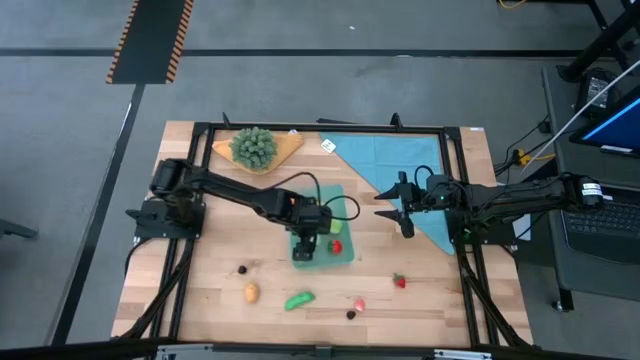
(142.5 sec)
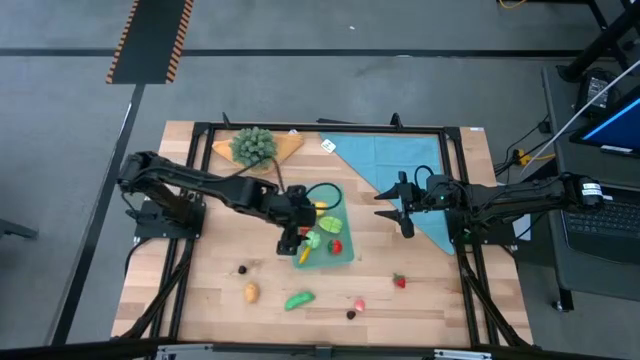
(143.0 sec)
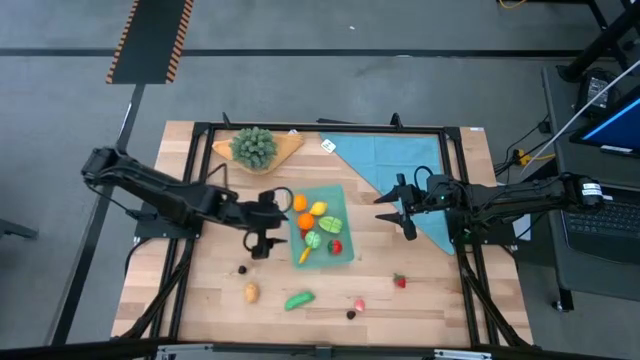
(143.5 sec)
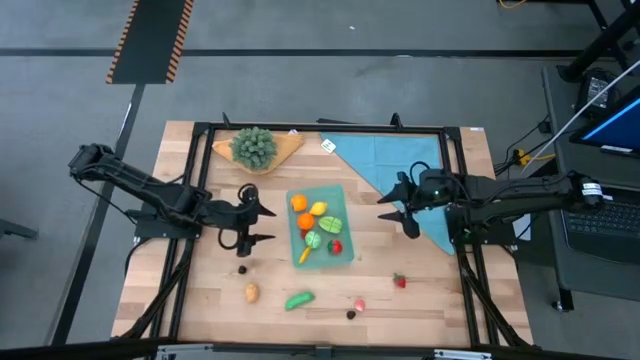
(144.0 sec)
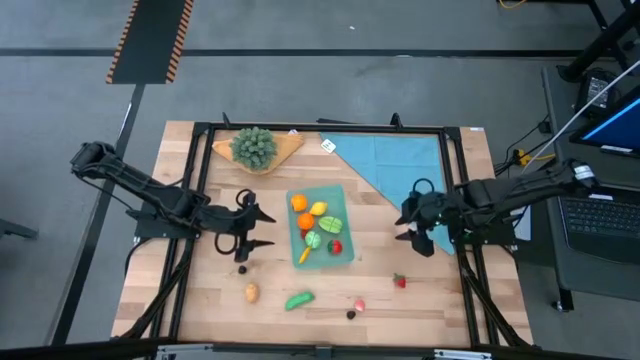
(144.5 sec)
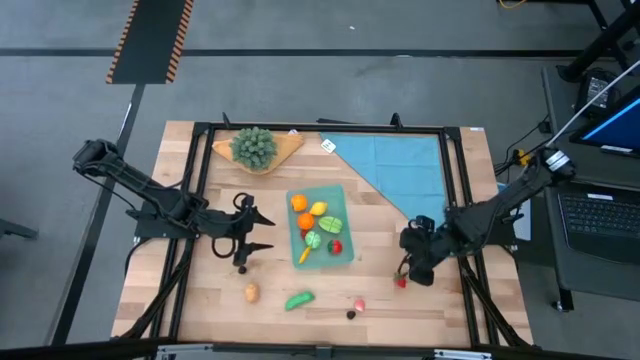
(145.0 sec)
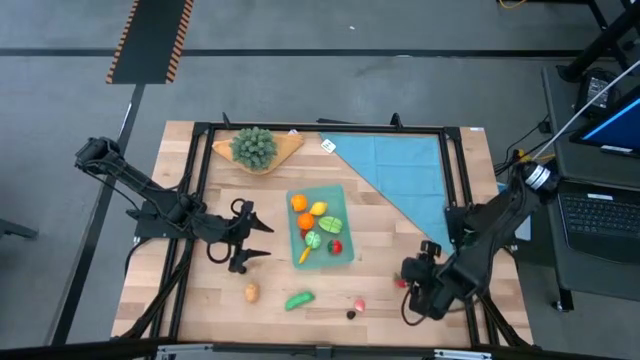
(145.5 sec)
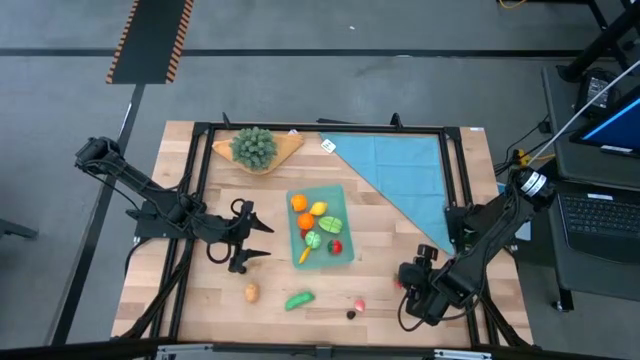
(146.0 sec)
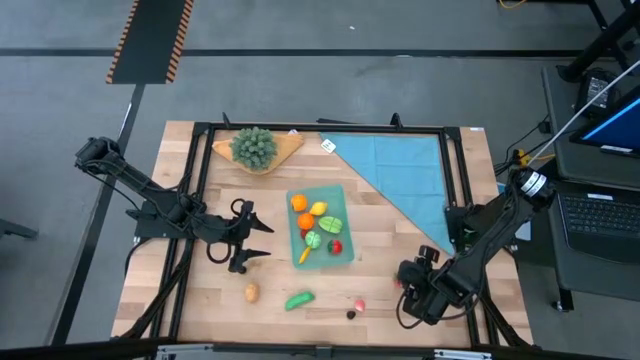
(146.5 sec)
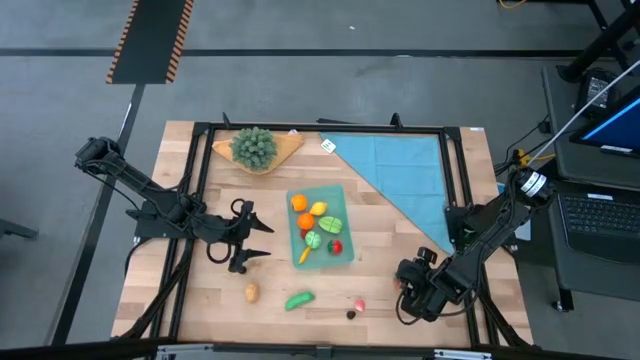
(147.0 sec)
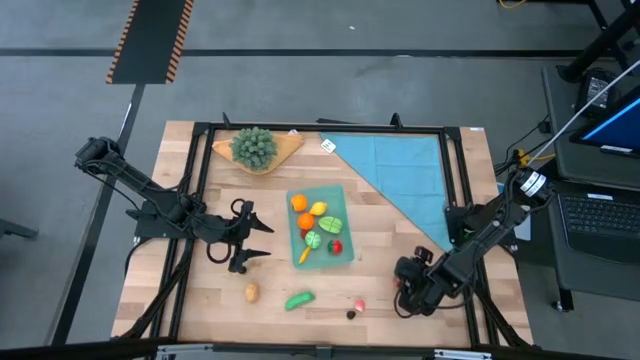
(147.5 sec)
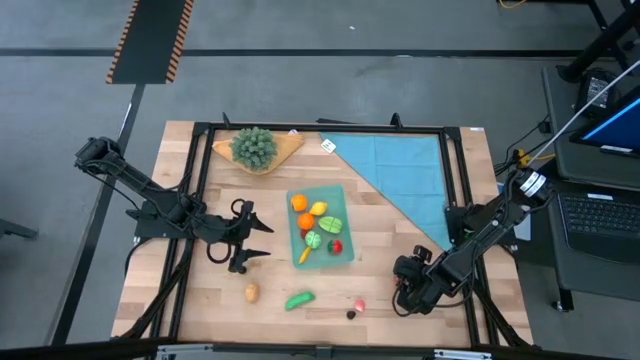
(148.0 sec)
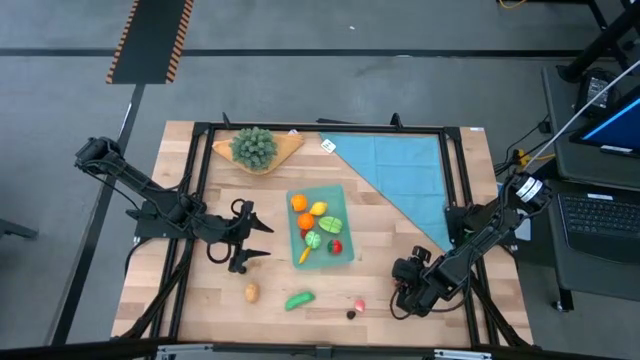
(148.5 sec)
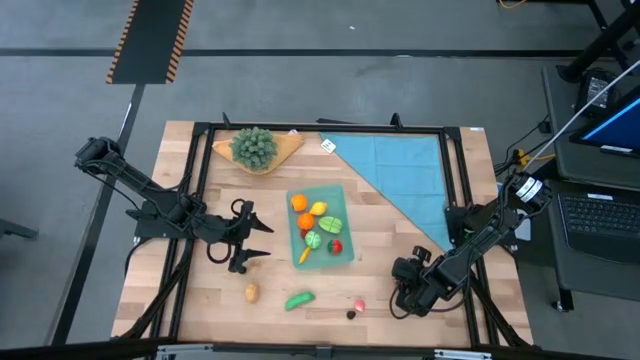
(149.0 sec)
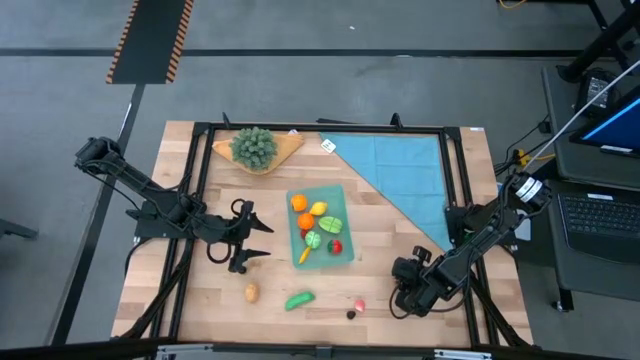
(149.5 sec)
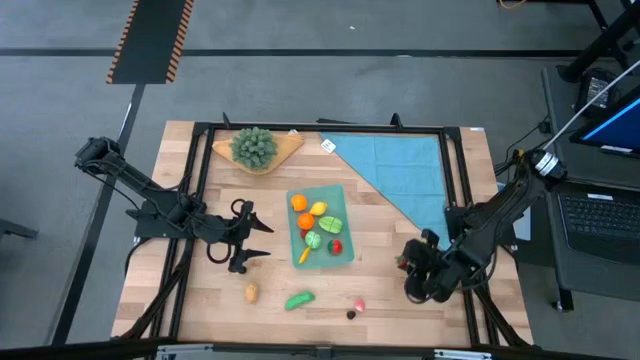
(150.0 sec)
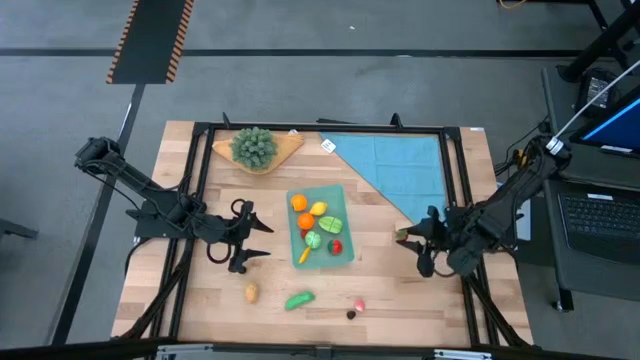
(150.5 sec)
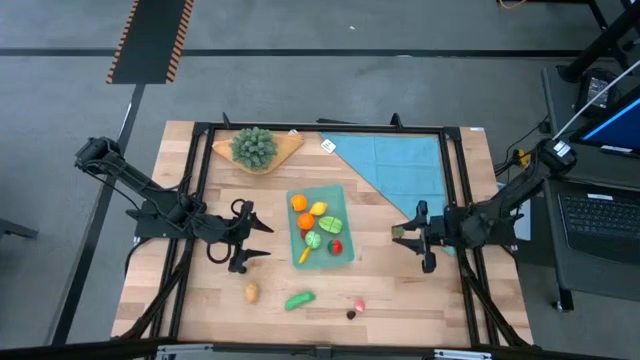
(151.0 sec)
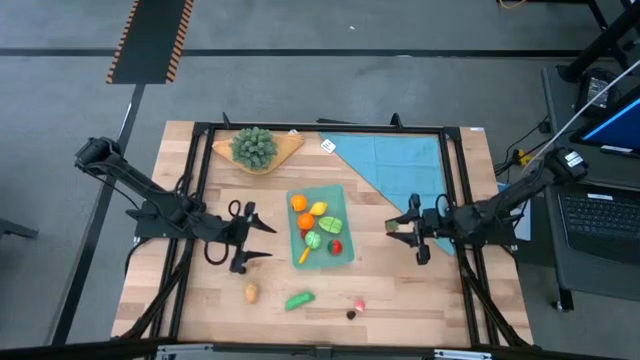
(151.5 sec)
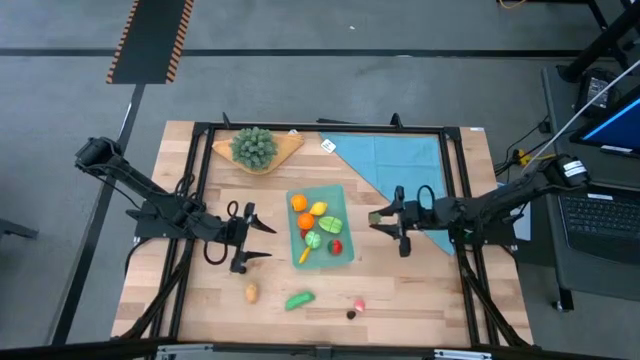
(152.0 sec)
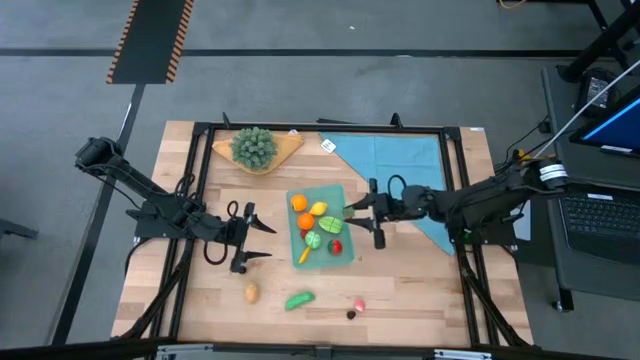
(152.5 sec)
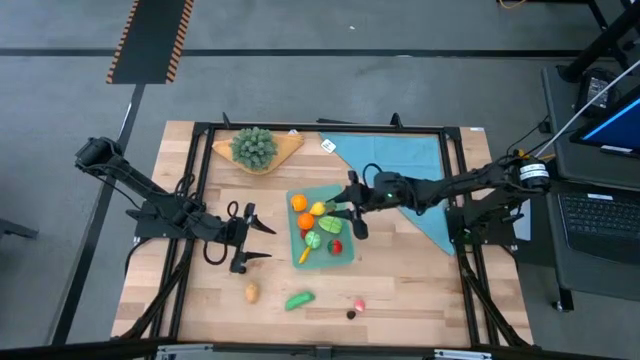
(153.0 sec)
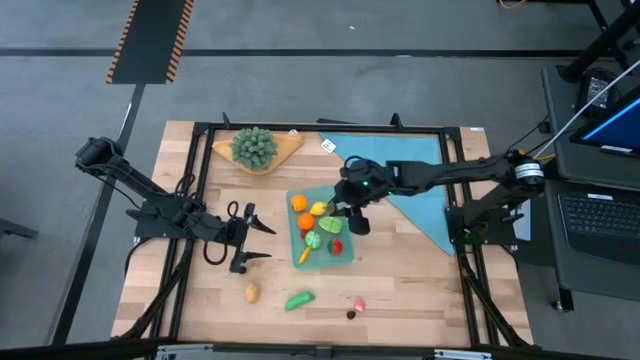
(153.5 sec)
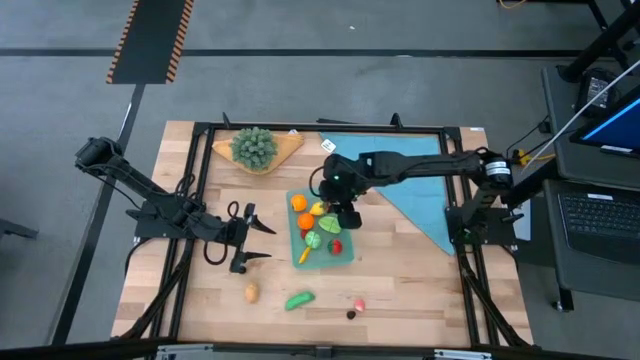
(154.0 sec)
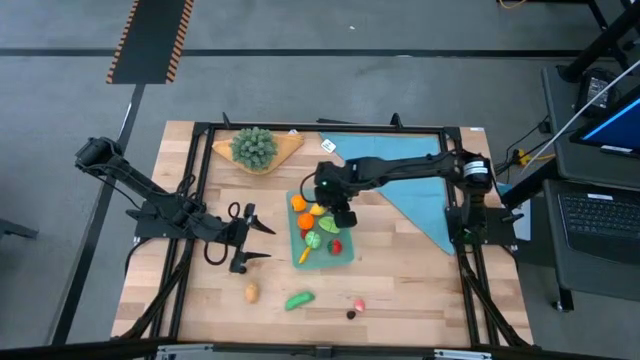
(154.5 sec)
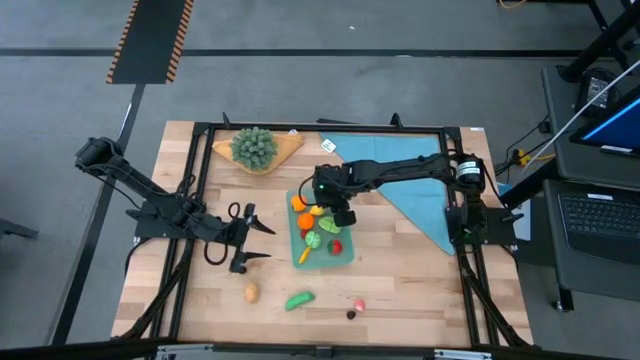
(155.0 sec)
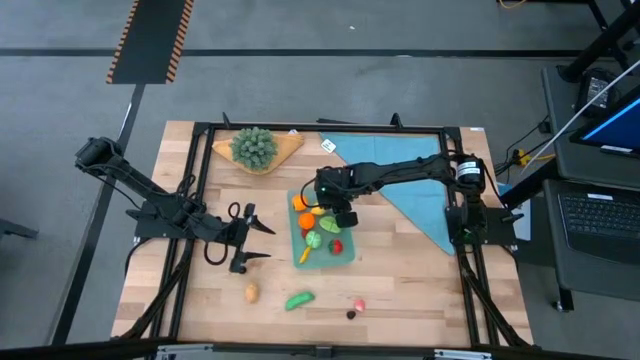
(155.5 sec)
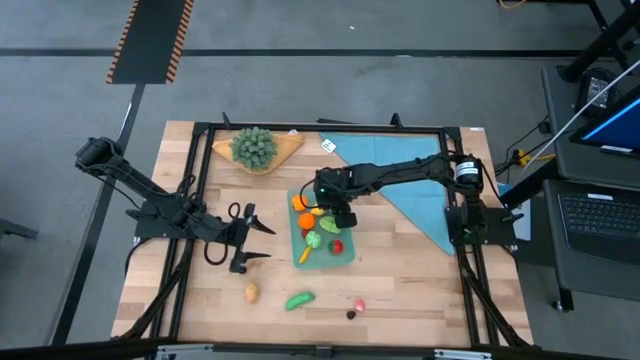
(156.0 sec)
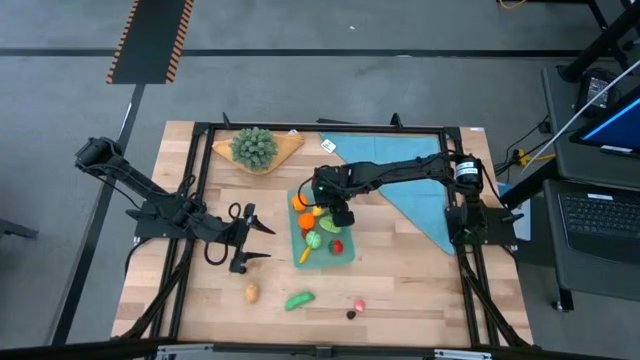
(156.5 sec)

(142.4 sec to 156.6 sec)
Task: Pick and placing Produce into tupperware
Put the small strawberry into the bin

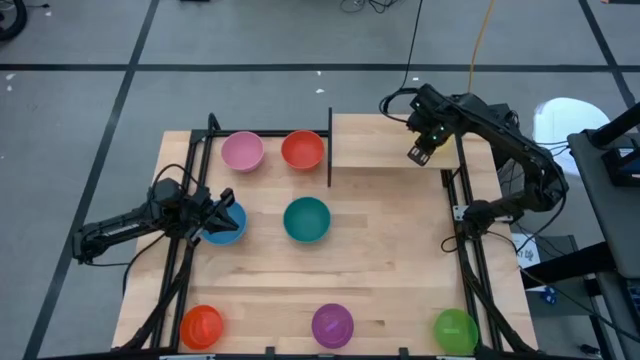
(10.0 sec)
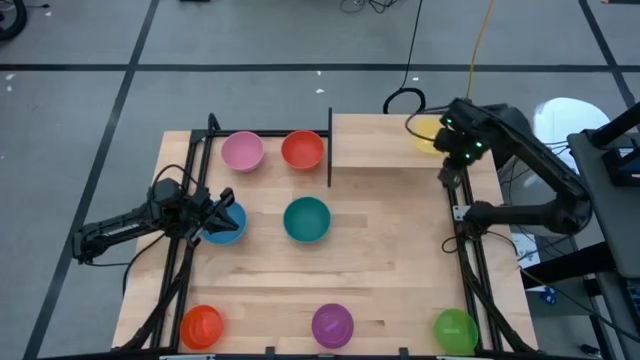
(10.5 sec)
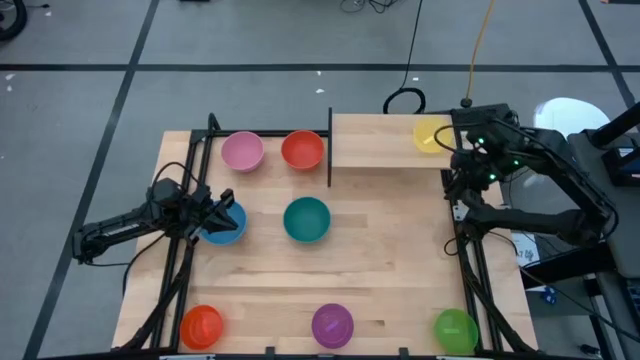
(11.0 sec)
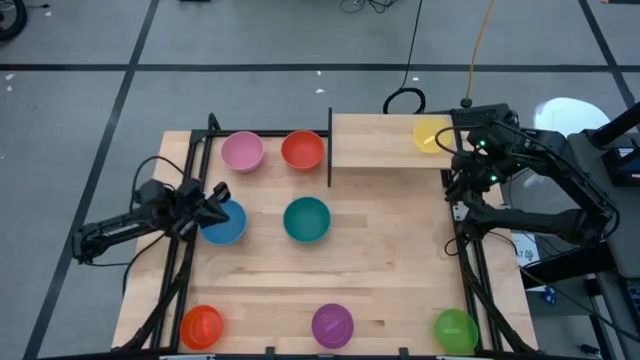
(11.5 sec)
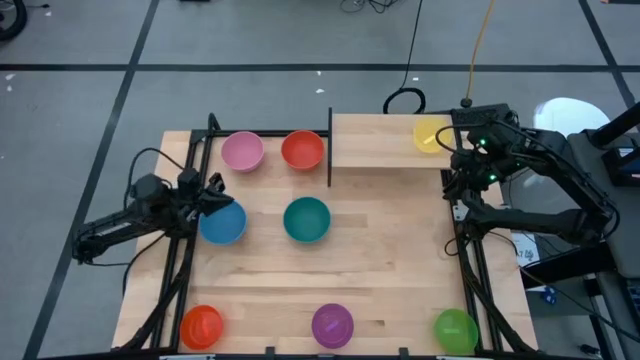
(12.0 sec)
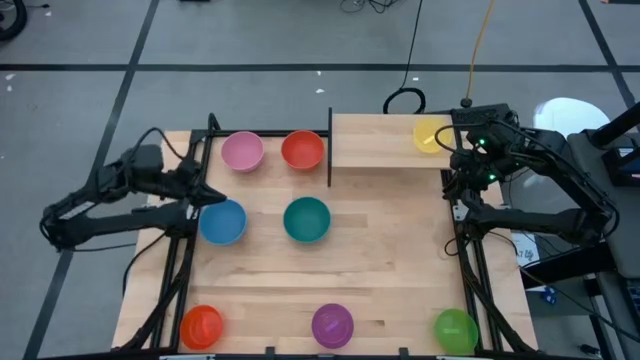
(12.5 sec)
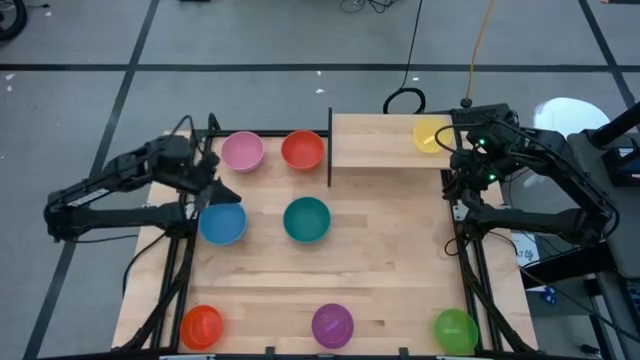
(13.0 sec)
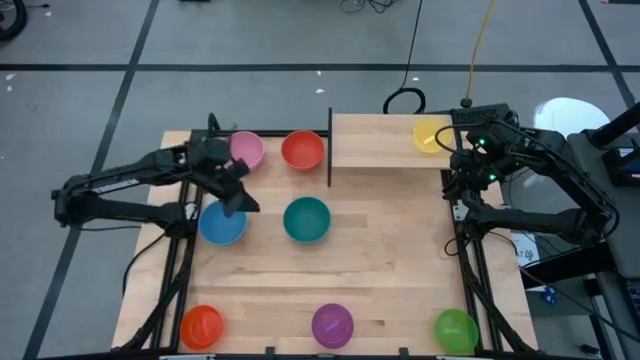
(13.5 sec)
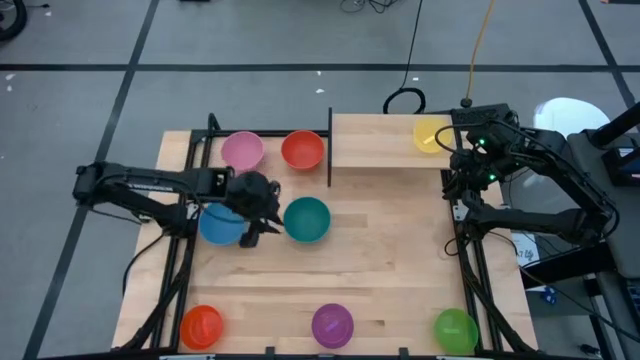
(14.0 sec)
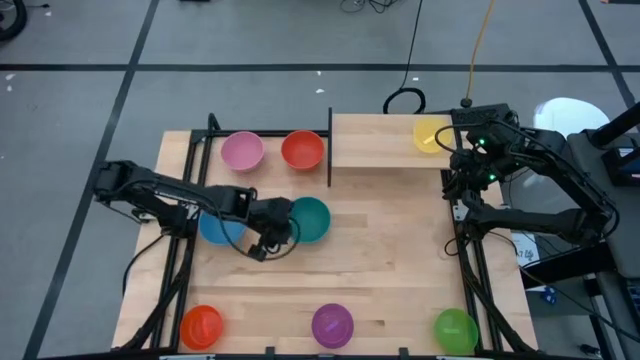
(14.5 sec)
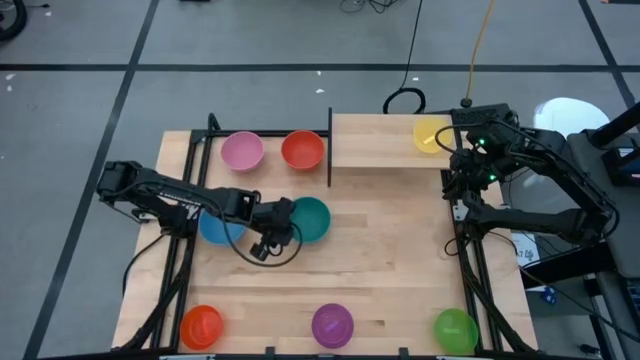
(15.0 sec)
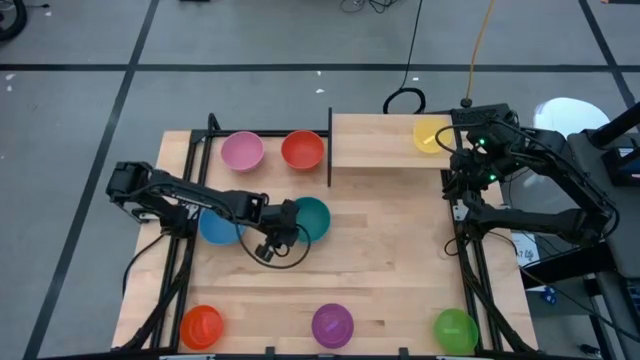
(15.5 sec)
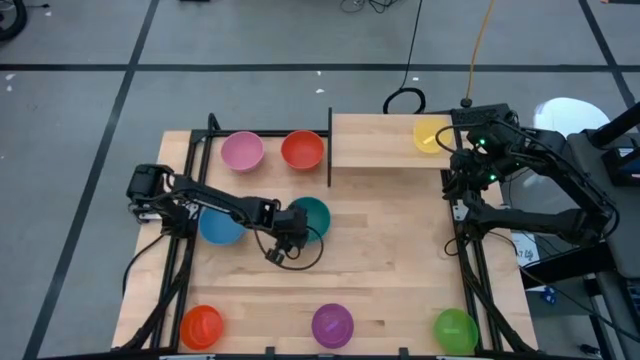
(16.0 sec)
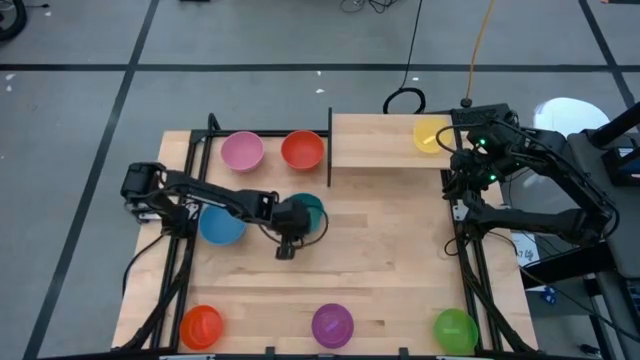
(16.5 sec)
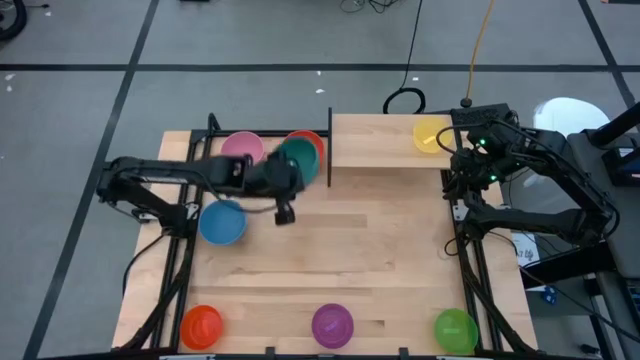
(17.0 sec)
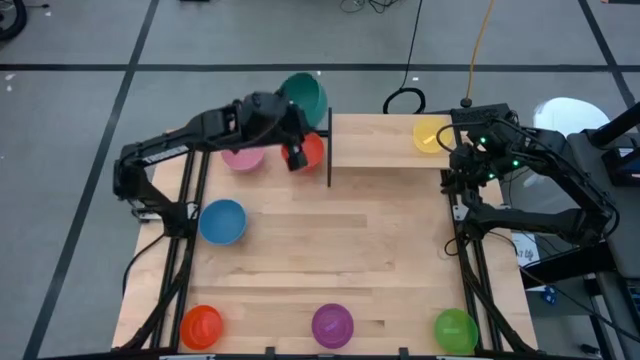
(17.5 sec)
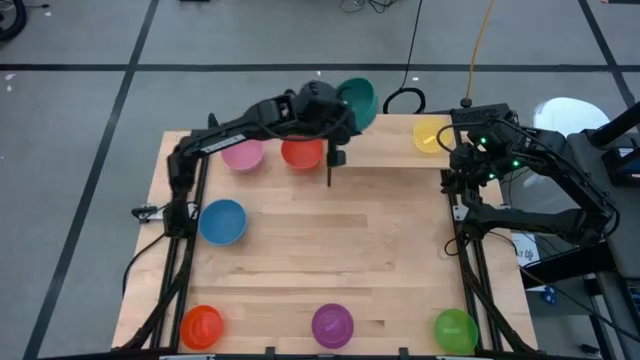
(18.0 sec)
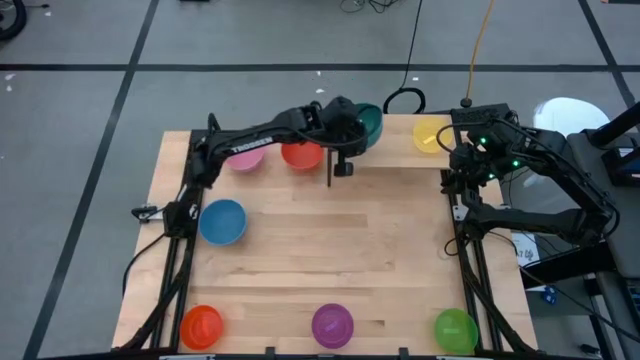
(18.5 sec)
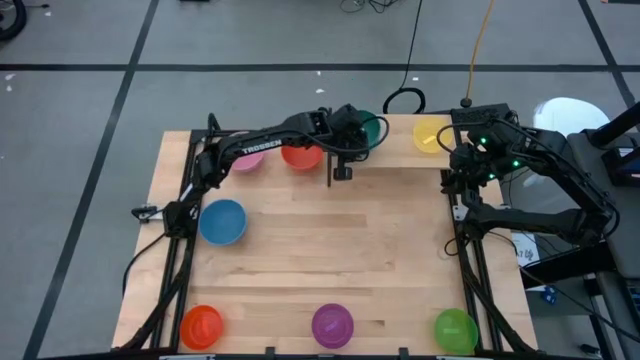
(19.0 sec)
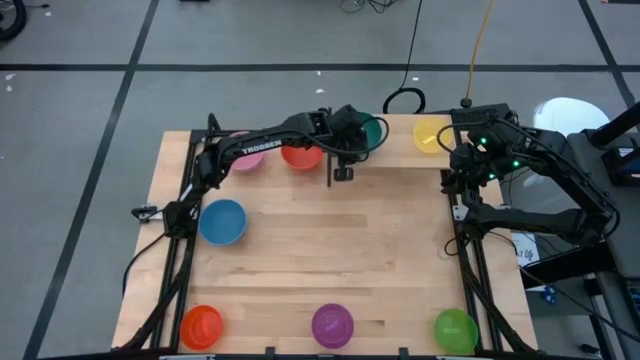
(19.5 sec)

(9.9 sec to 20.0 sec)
Task: Place and stack bowls onto a shelf
Put the dark green bowl on the shelf
